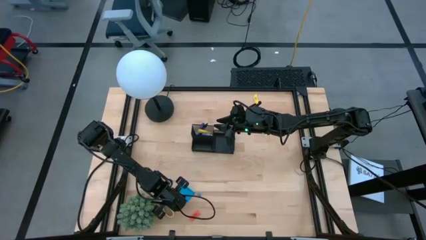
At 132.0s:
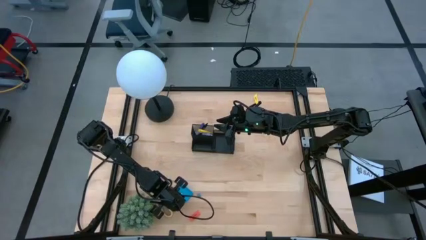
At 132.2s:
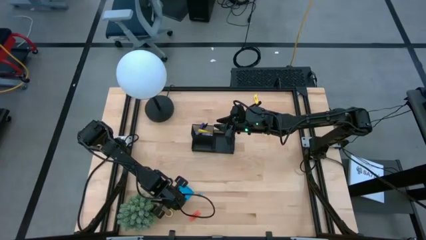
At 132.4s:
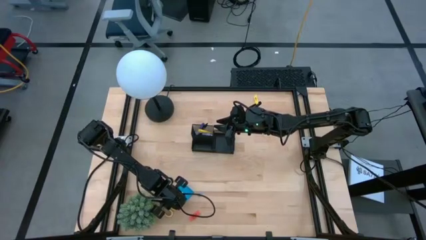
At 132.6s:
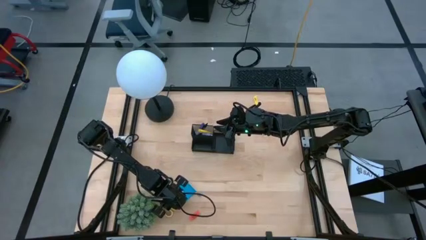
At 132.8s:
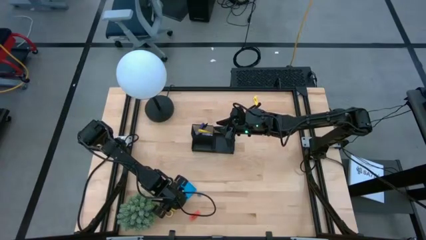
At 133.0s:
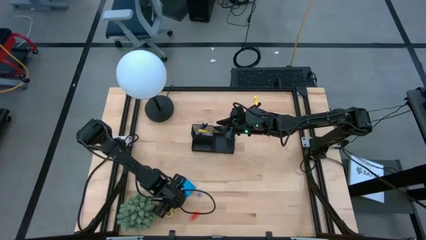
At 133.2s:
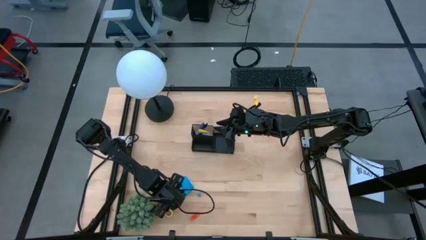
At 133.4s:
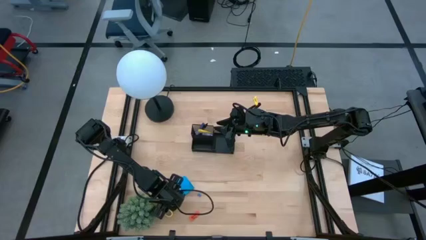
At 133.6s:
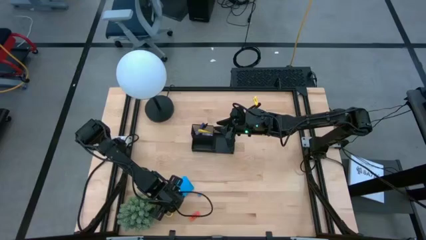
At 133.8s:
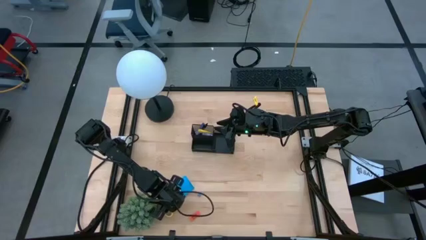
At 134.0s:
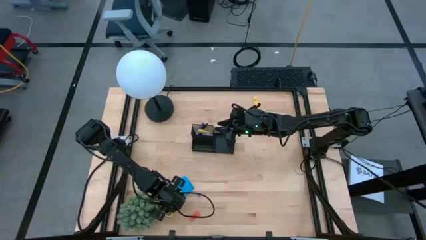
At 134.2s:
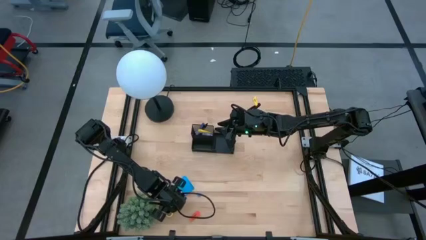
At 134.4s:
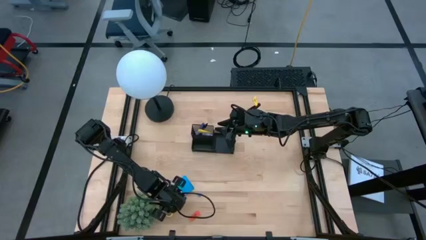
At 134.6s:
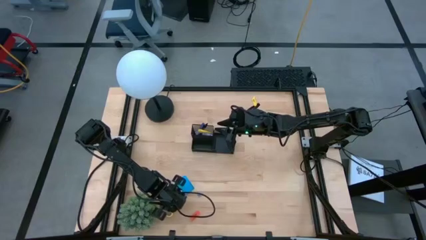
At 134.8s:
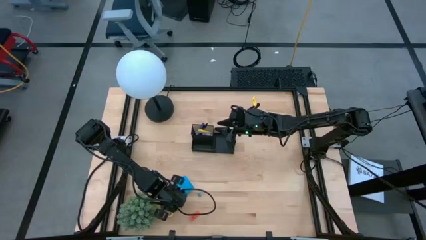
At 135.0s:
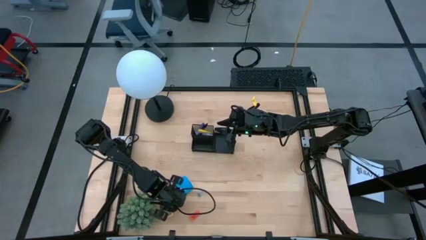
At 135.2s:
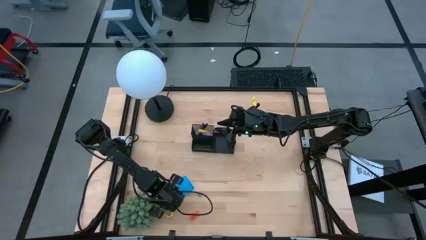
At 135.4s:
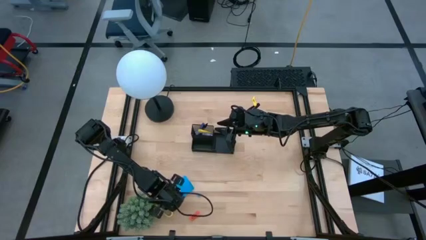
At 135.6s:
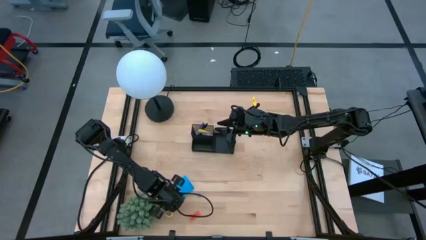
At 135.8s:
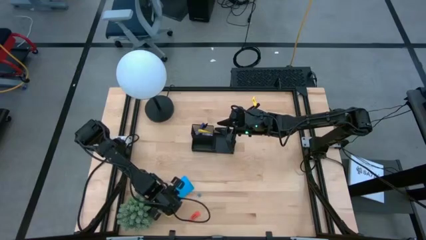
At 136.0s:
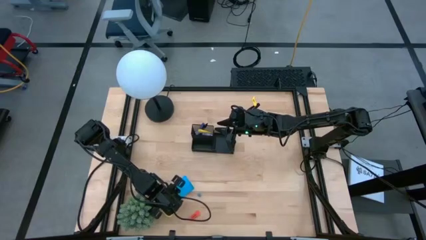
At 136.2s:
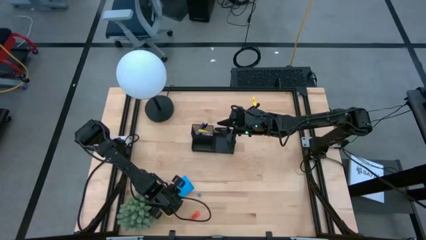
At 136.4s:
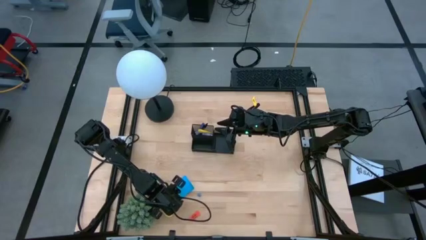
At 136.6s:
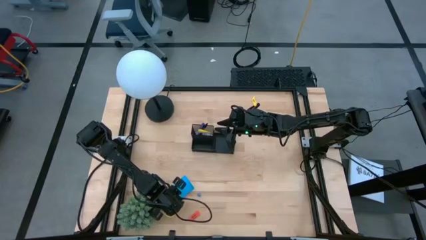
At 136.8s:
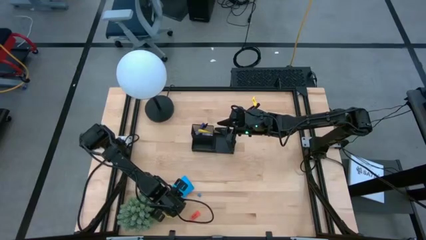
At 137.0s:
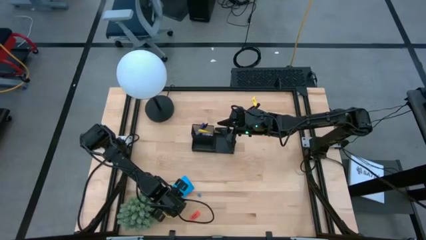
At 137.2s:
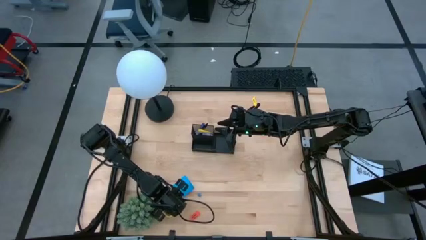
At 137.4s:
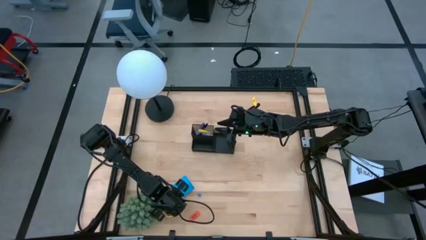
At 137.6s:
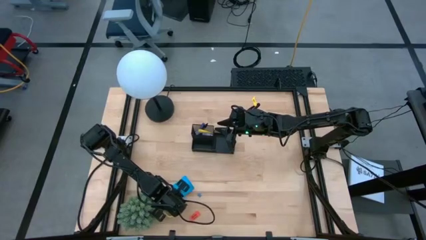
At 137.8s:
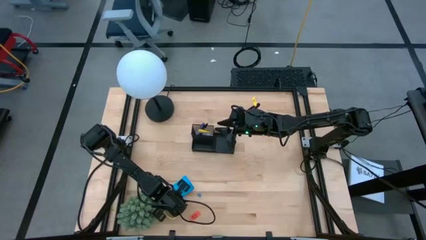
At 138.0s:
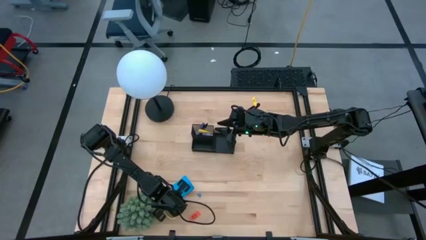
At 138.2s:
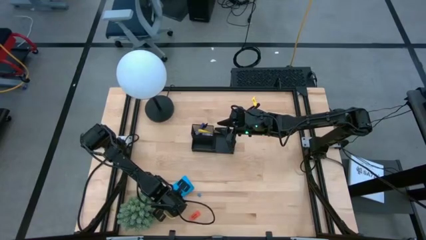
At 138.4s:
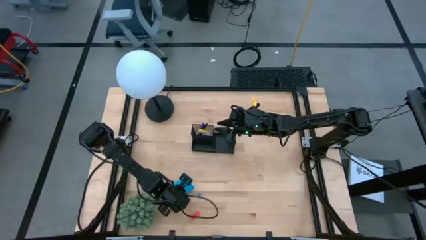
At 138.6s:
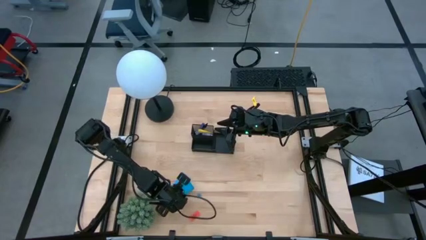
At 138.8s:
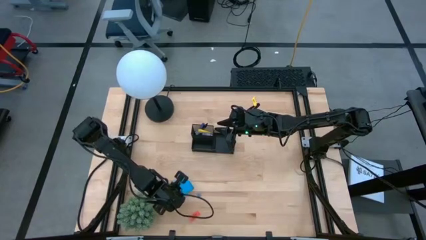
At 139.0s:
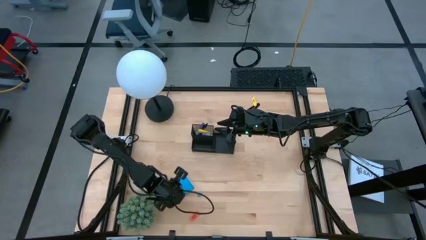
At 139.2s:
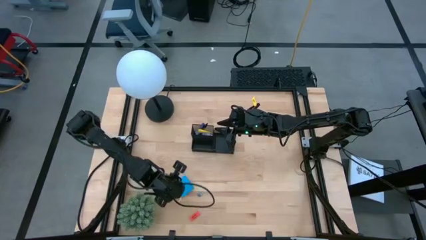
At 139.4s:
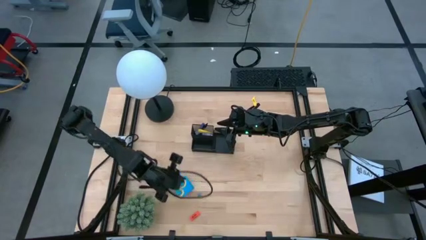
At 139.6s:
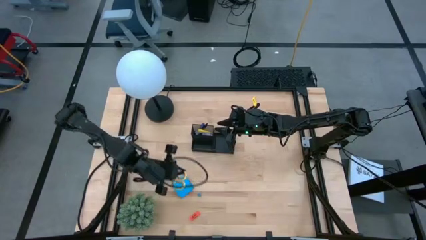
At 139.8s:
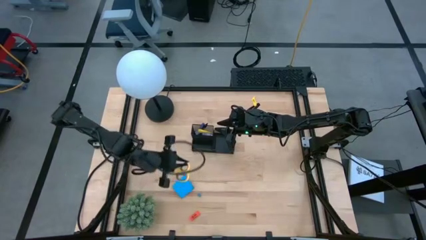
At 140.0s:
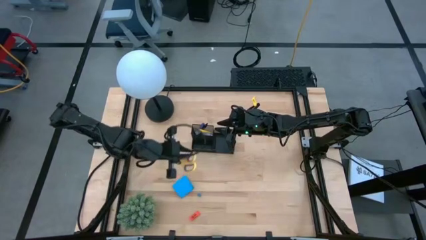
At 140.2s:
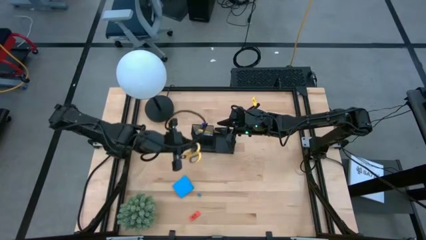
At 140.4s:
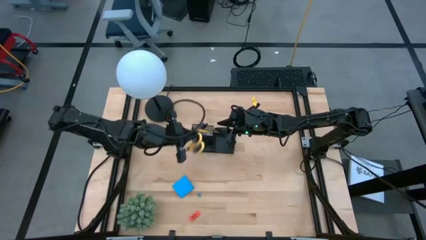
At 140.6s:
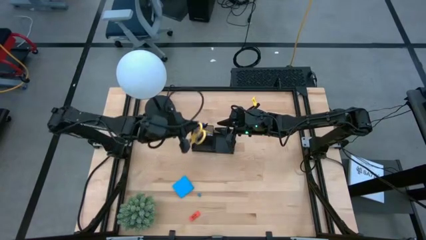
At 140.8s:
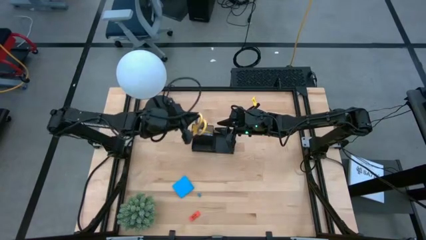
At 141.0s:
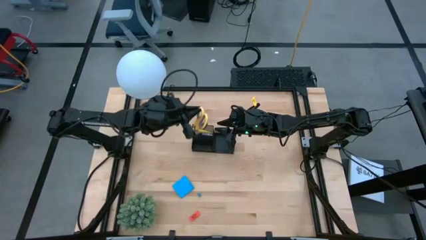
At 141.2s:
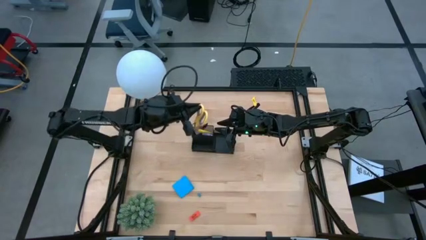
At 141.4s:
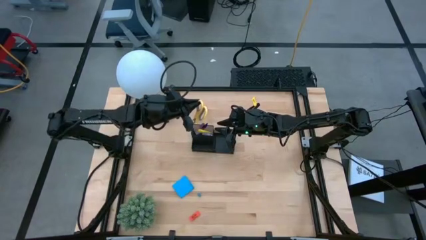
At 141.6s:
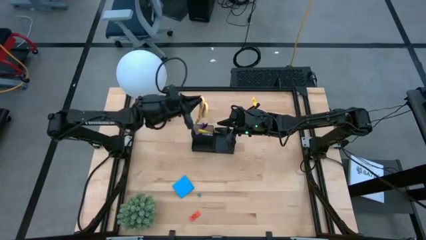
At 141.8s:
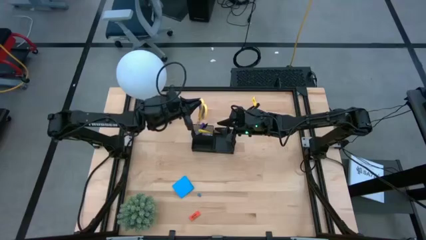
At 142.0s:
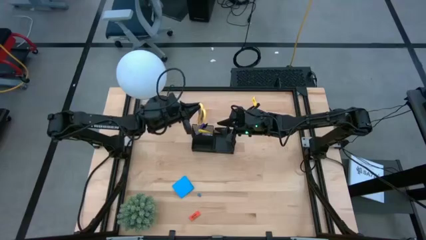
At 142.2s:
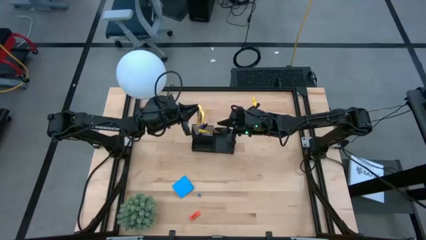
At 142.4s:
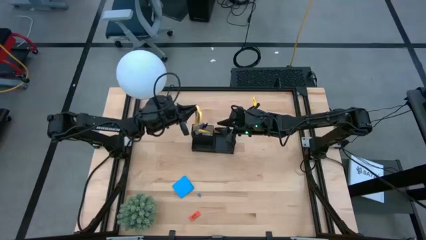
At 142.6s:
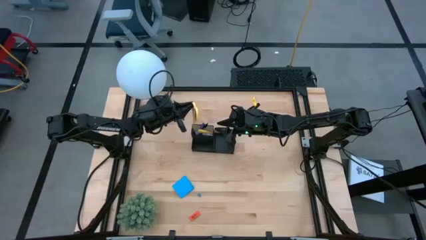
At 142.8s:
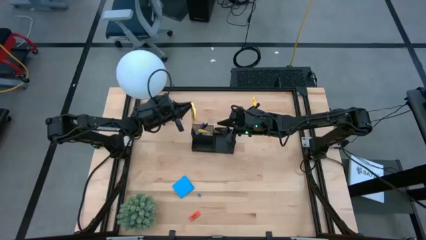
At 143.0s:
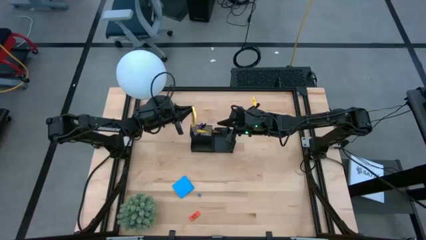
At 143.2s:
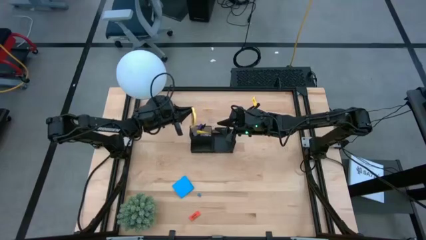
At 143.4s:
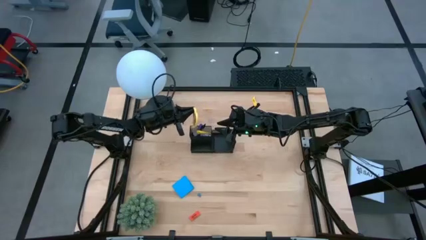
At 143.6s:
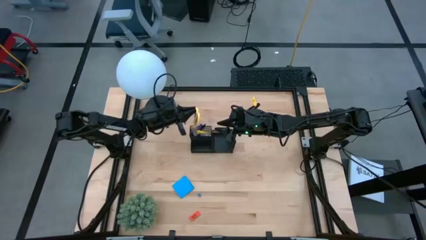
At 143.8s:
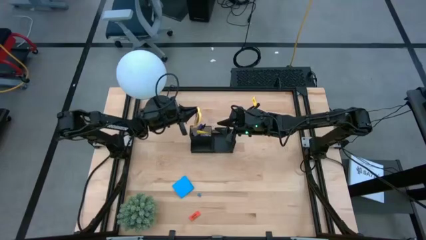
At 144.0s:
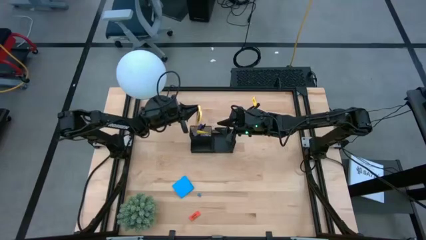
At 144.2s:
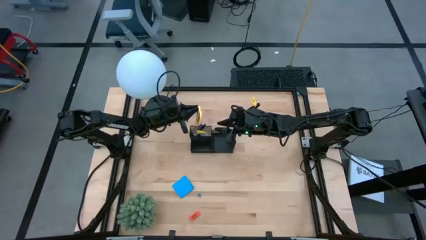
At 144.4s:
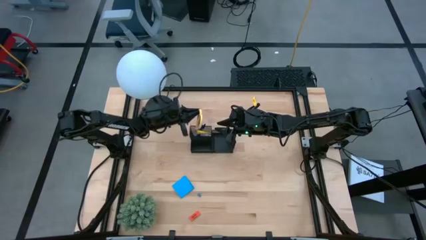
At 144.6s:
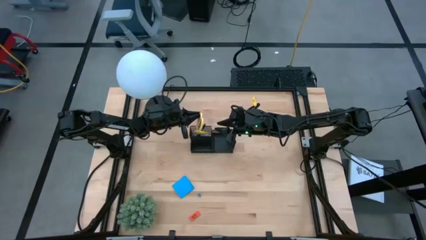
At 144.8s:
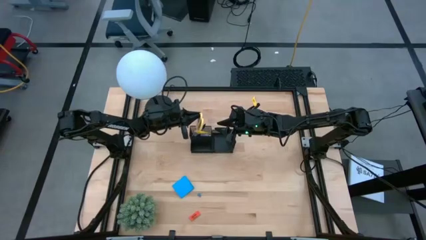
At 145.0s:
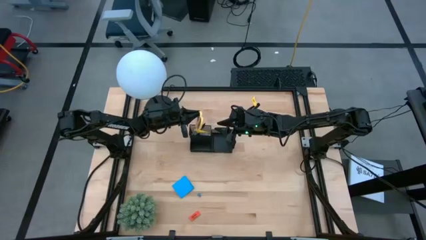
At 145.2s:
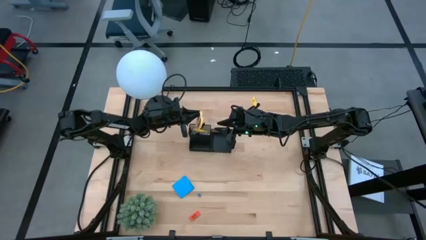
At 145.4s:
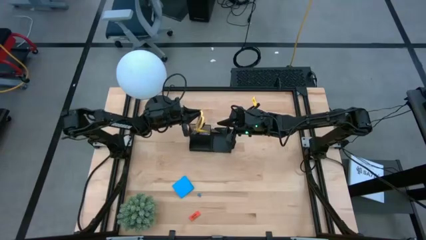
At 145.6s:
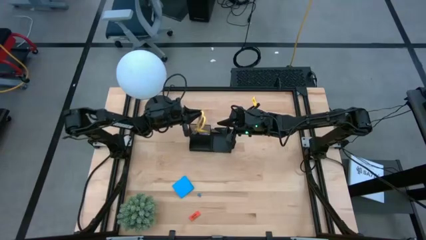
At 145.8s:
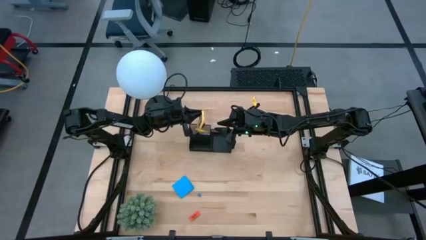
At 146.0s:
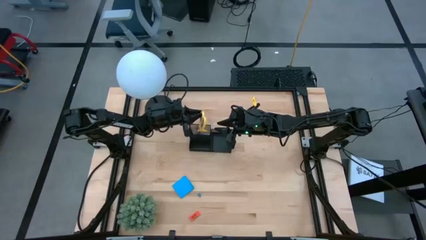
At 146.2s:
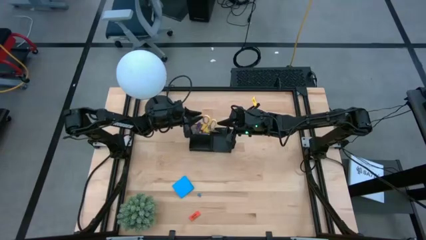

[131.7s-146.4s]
Task: Pick and place office supplies into organizer
Put the yellow scissors into the black desk organizer

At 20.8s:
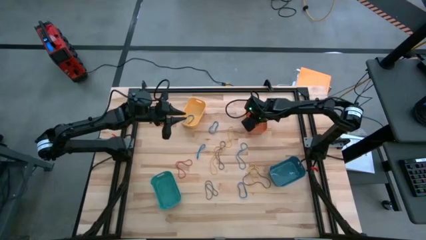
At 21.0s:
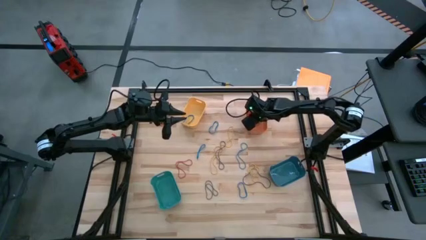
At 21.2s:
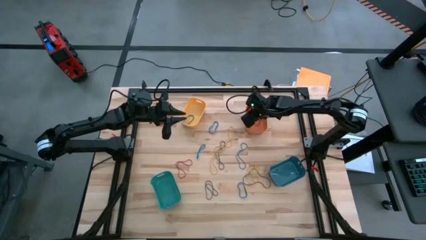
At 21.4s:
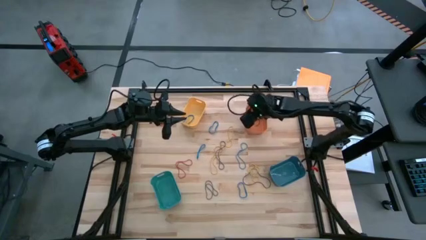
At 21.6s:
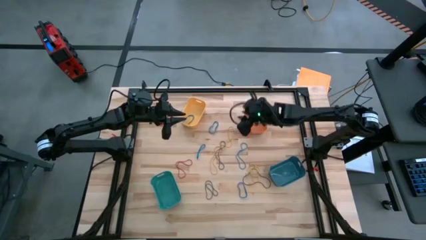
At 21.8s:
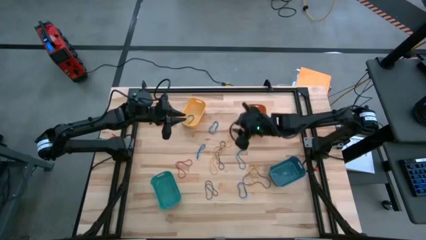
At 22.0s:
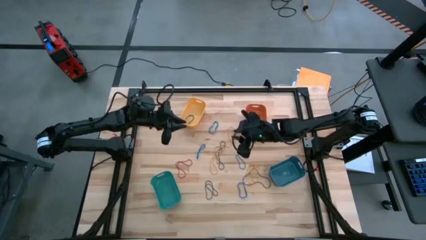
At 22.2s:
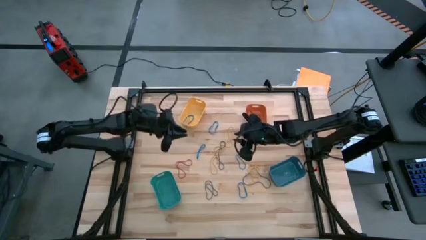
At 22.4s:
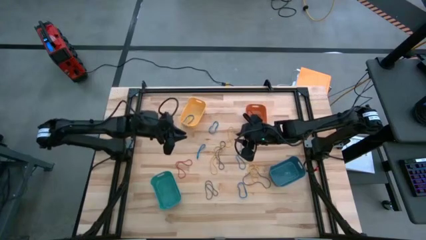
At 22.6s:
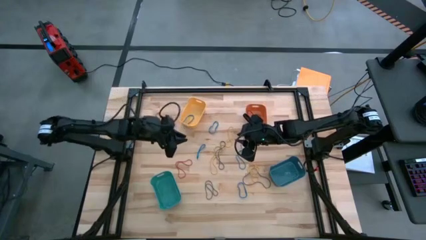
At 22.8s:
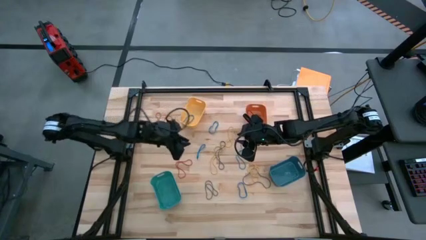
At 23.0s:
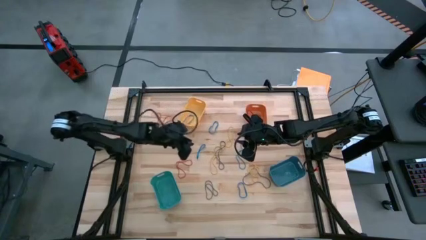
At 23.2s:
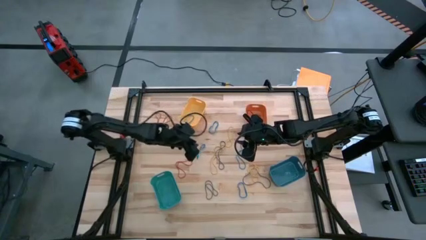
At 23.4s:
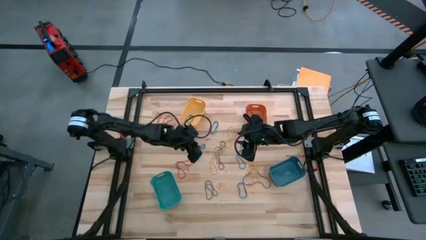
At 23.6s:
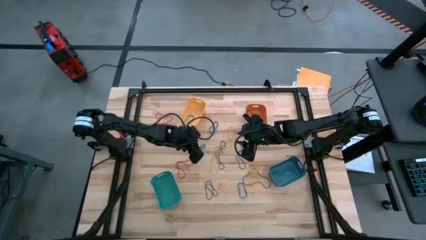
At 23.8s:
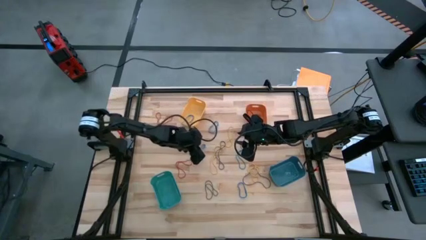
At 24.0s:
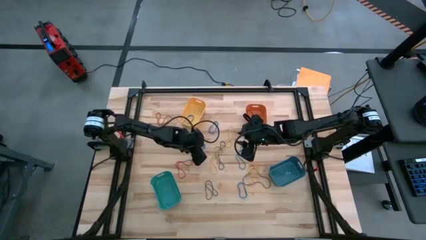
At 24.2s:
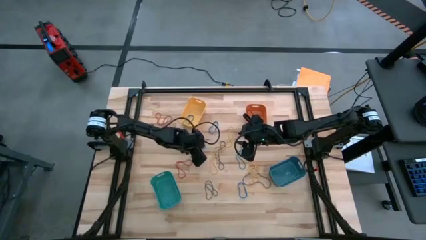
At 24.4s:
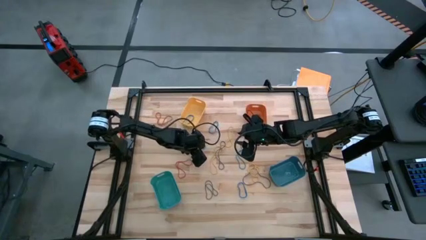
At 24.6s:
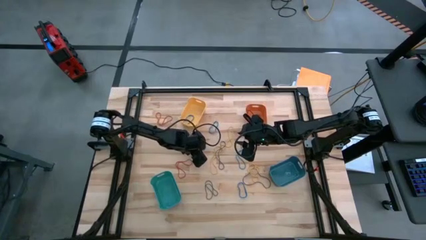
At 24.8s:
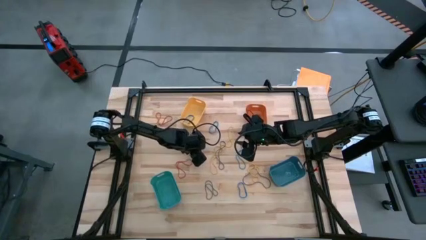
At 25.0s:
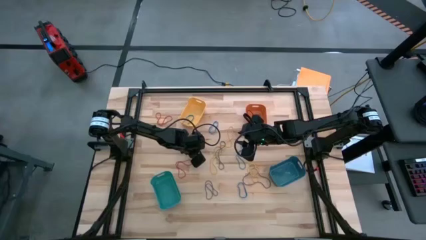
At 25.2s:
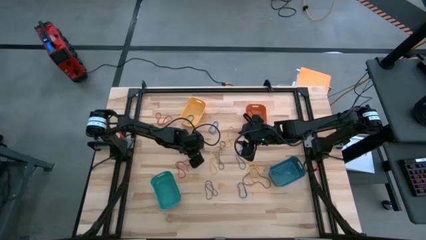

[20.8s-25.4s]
Task: Sort rubber bands into baskets
Put the blue rubber band into the yellow bin
